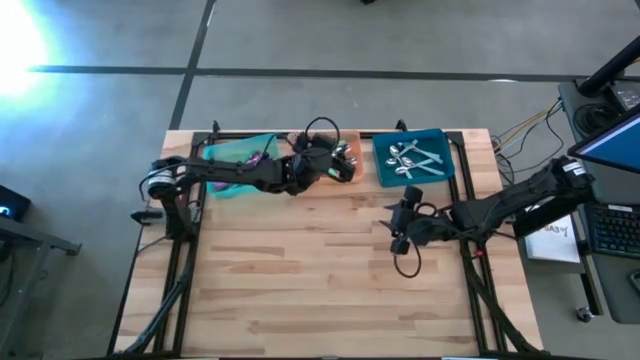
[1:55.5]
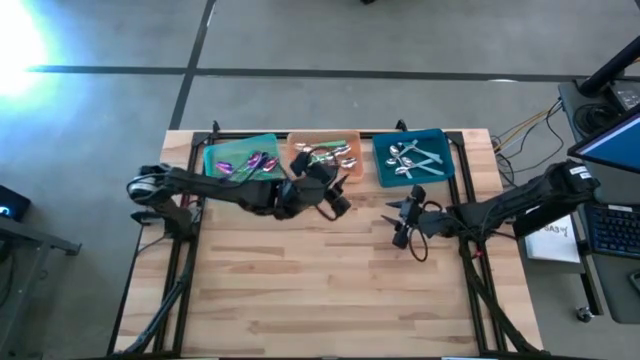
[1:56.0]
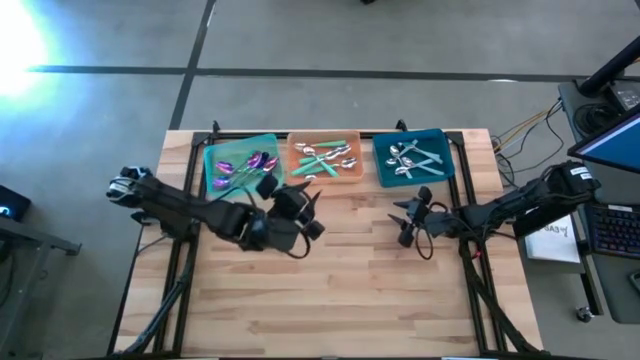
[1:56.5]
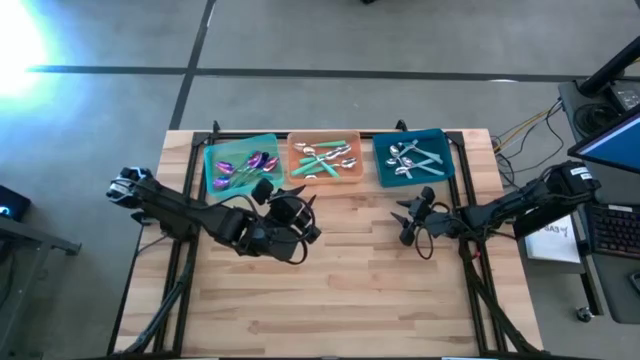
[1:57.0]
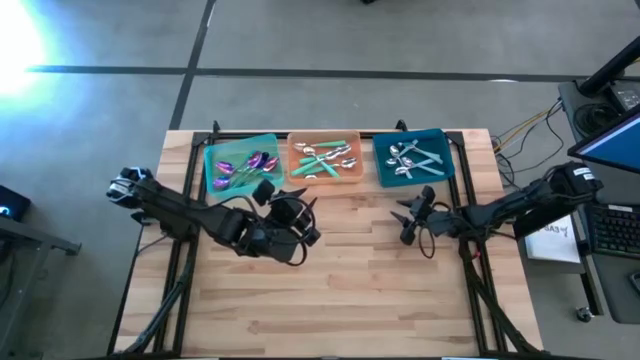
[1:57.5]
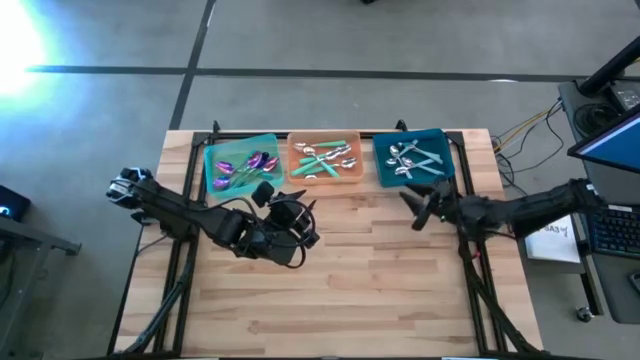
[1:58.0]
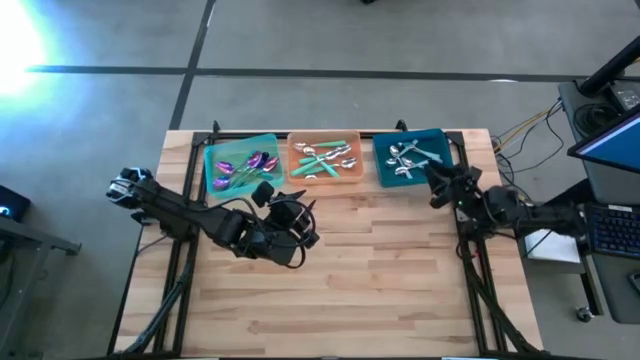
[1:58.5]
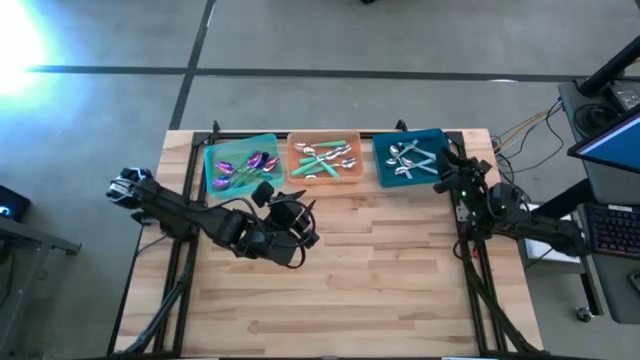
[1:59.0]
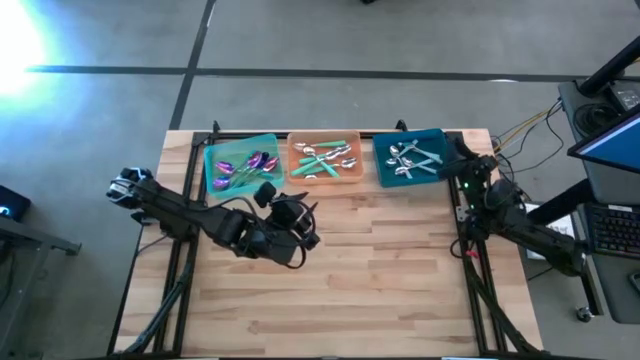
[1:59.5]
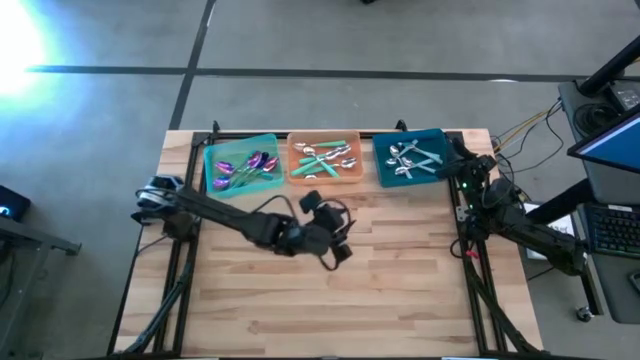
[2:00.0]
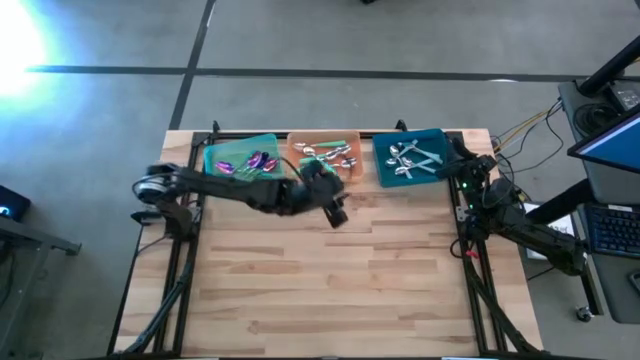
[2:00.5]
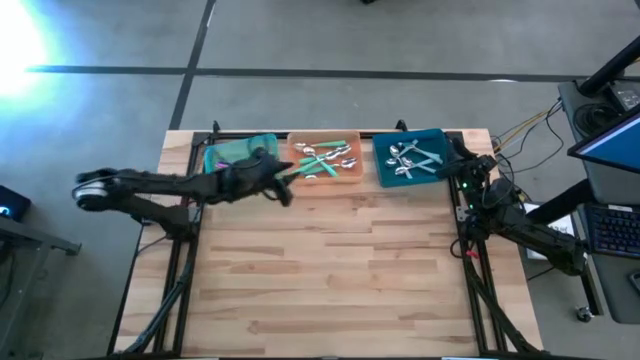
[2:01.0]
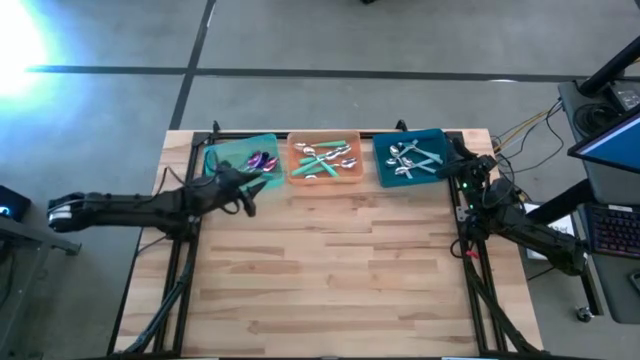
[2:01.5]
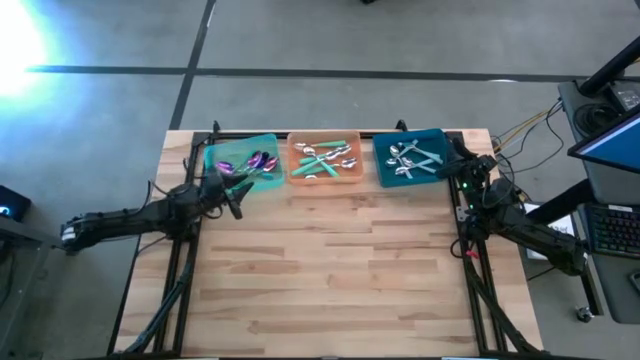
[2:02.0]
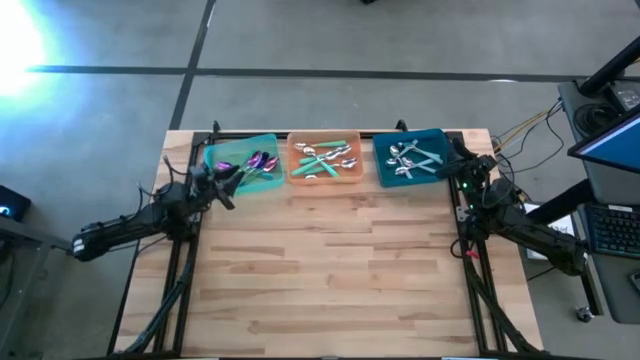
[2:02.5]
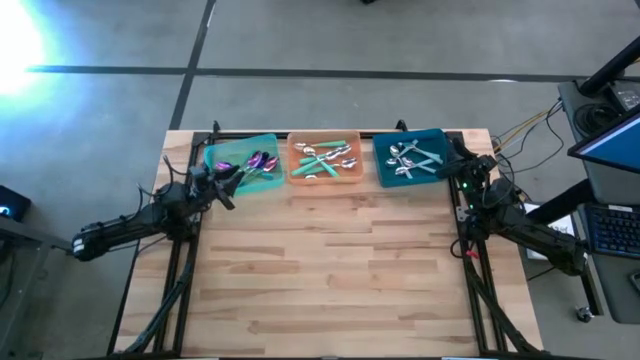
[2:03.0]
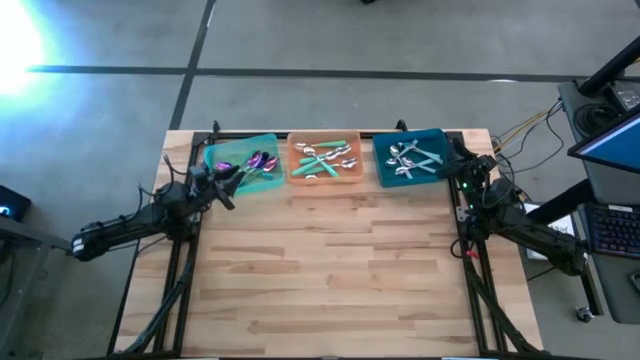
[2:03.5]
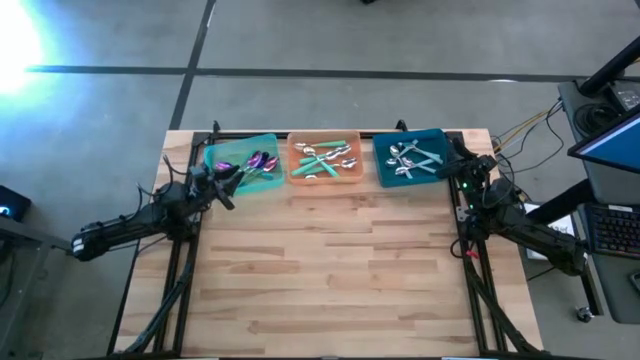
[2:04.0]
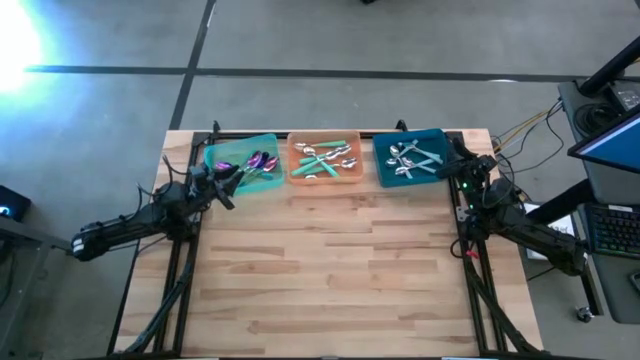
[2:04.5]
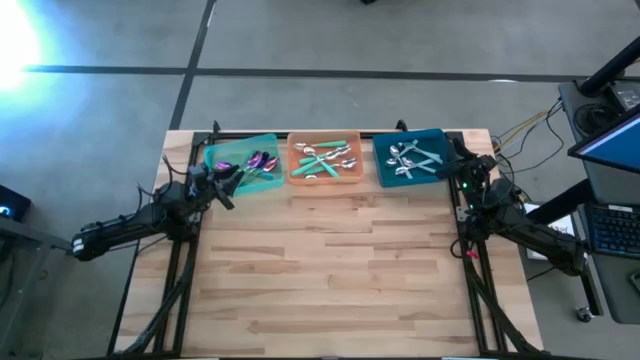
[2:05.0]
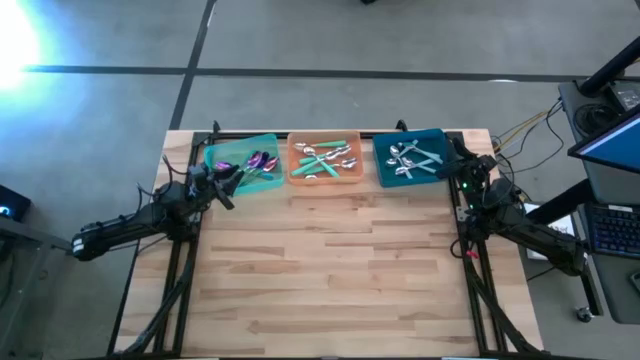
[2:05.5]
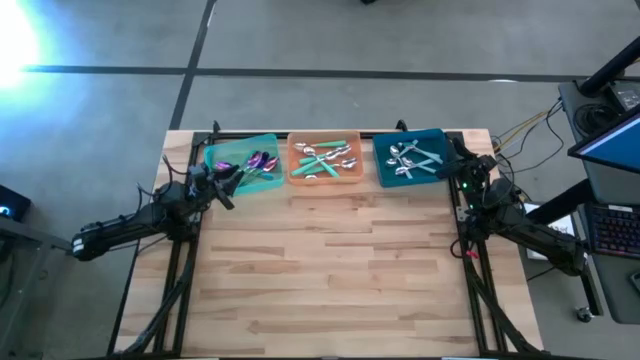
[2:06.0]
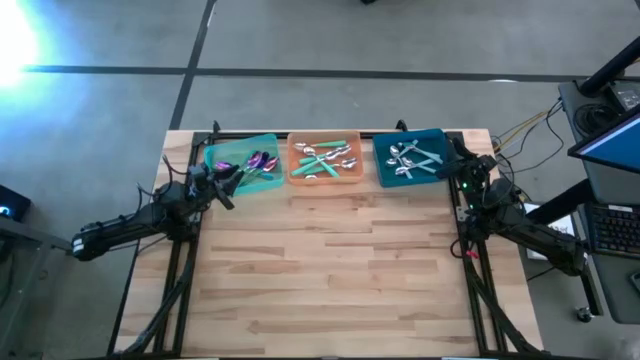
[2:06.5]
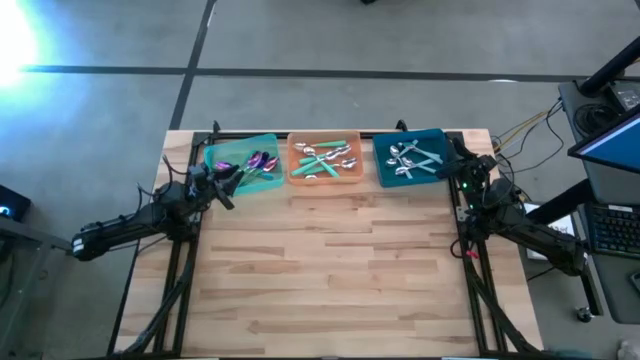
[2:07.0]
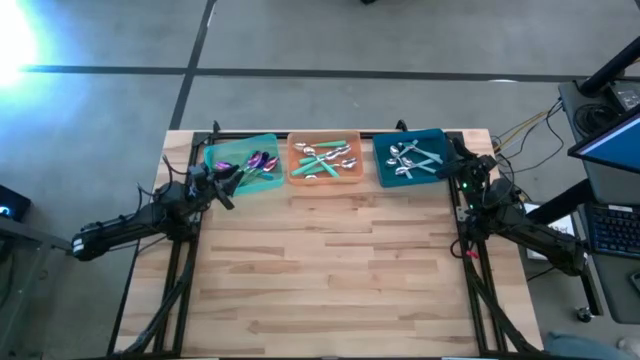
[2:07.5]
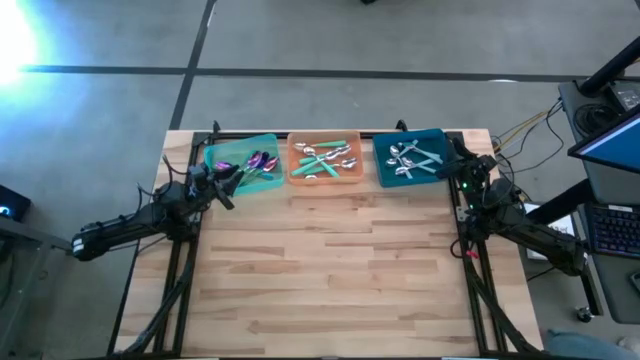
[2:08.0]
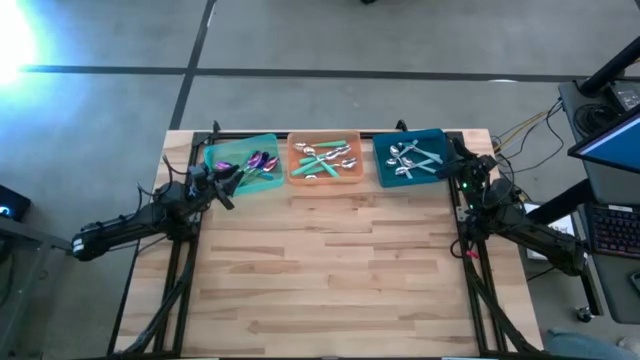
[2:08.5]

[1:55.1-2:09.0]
Task: Sort silverware by color (type)
Return to Home Position
